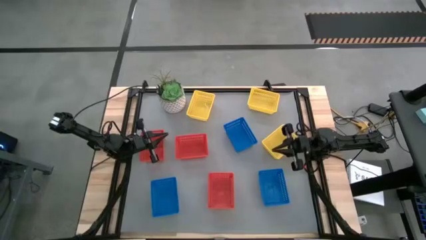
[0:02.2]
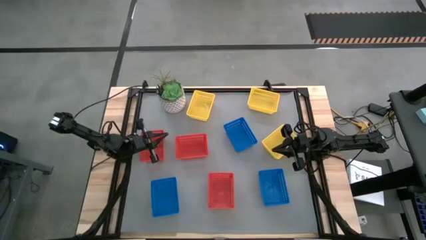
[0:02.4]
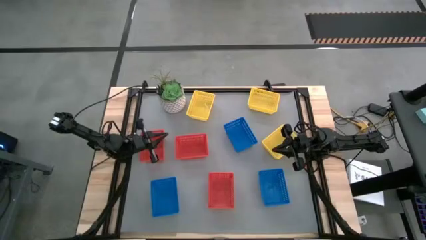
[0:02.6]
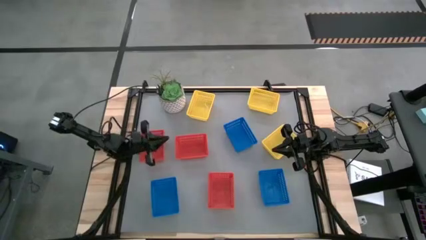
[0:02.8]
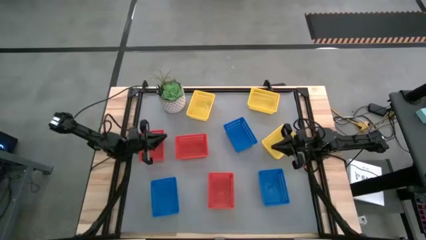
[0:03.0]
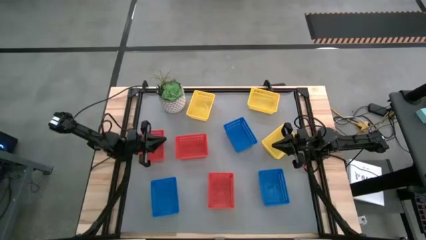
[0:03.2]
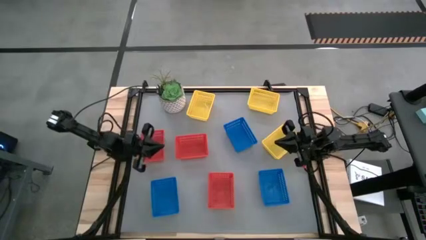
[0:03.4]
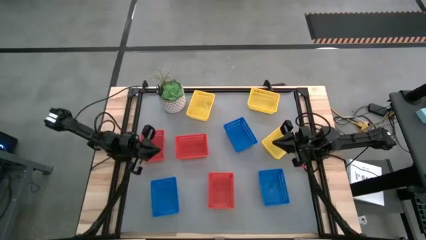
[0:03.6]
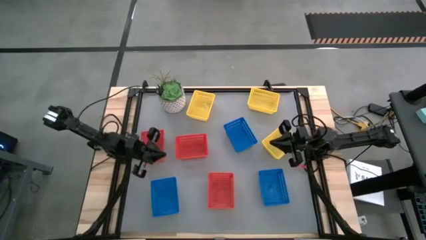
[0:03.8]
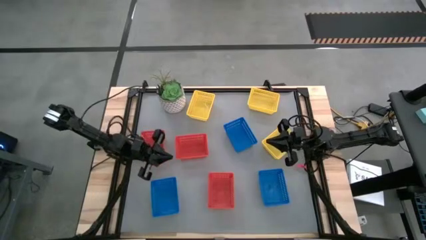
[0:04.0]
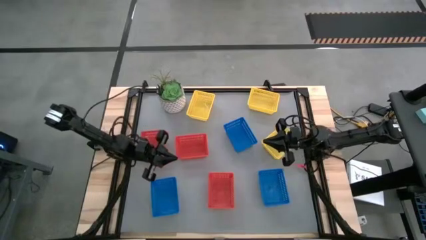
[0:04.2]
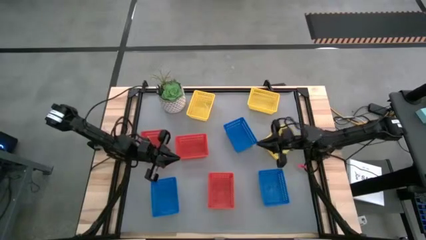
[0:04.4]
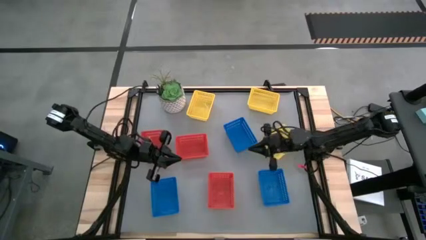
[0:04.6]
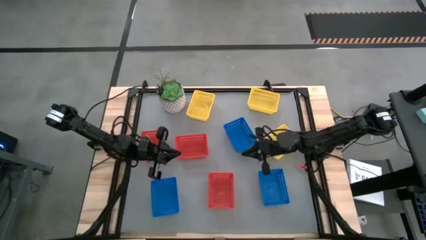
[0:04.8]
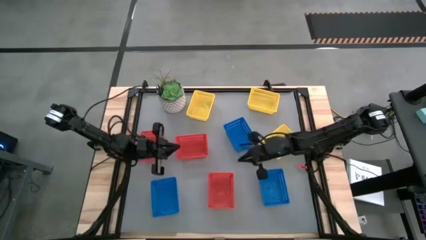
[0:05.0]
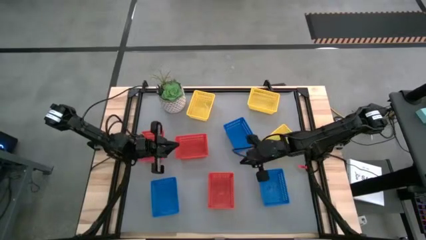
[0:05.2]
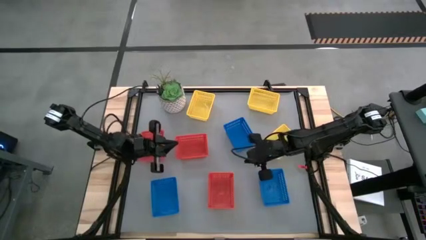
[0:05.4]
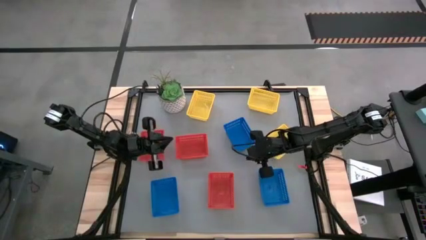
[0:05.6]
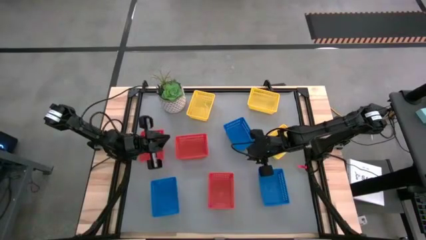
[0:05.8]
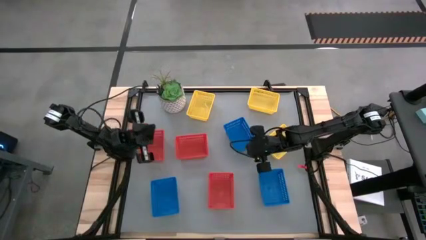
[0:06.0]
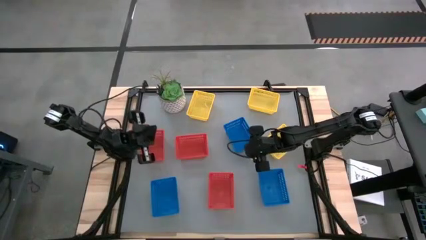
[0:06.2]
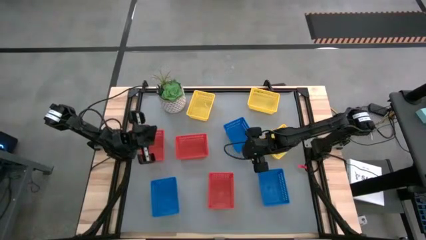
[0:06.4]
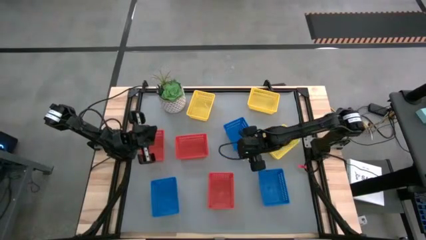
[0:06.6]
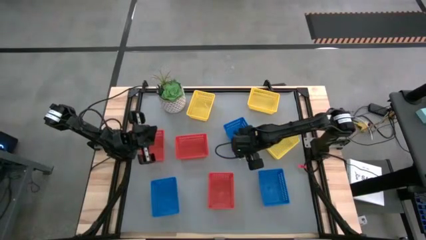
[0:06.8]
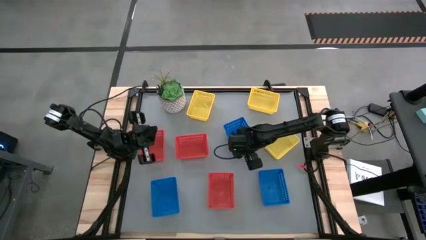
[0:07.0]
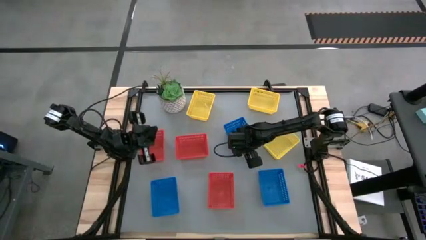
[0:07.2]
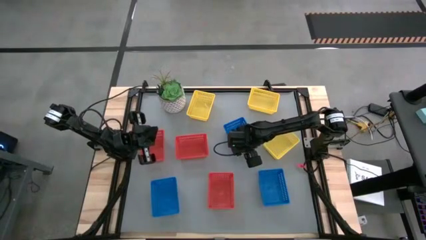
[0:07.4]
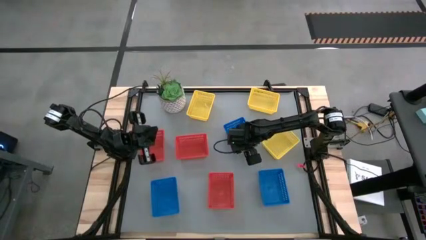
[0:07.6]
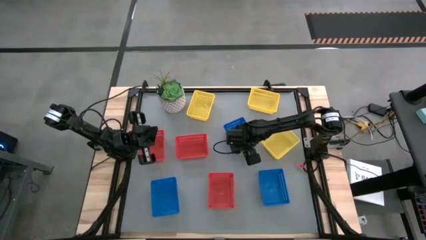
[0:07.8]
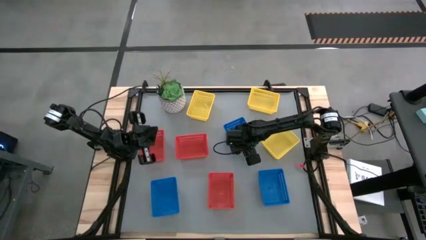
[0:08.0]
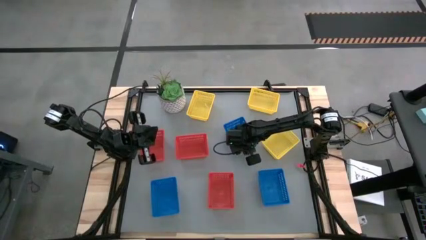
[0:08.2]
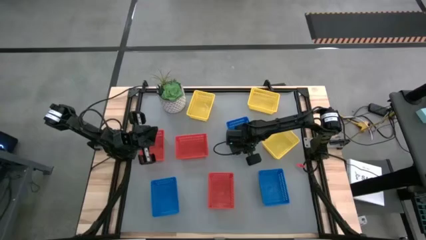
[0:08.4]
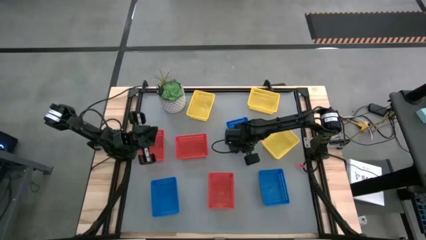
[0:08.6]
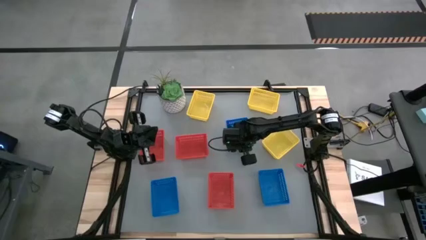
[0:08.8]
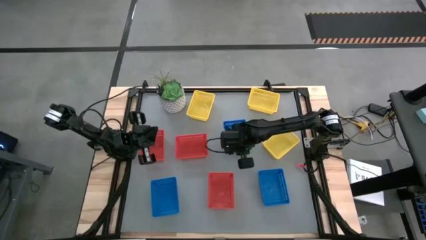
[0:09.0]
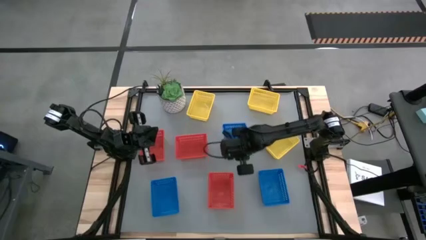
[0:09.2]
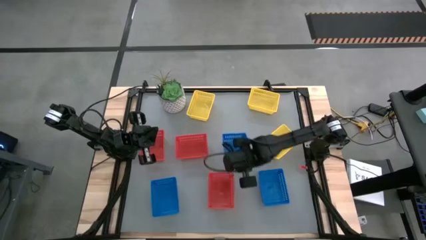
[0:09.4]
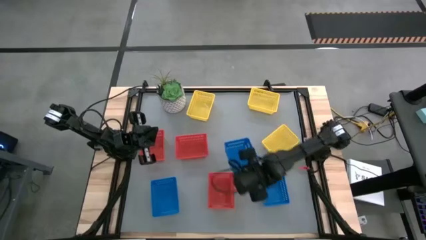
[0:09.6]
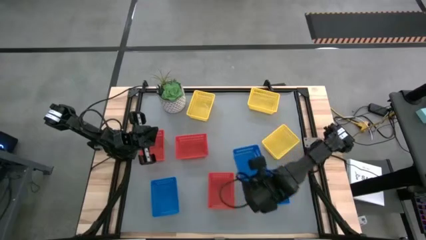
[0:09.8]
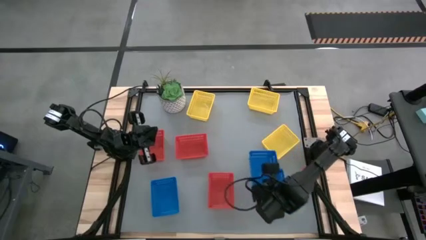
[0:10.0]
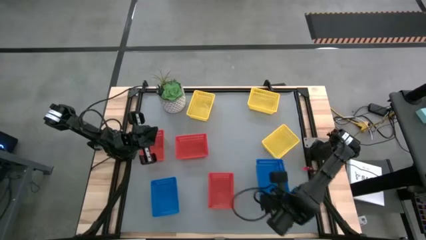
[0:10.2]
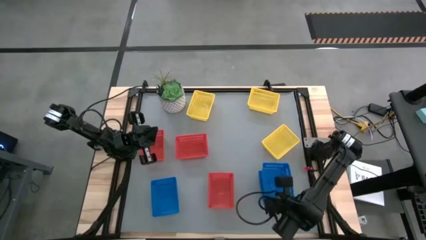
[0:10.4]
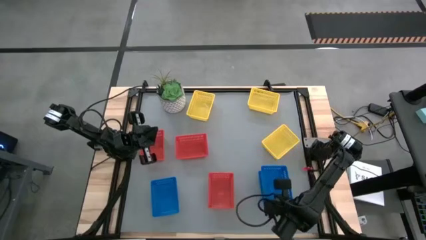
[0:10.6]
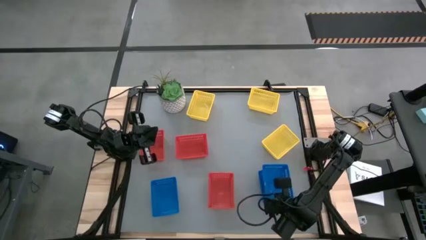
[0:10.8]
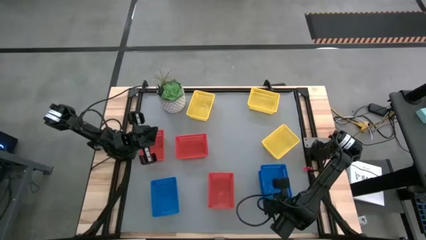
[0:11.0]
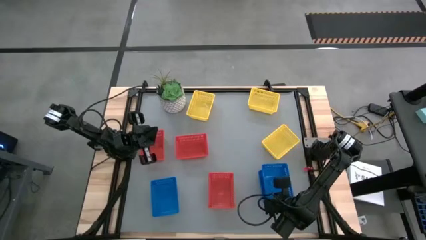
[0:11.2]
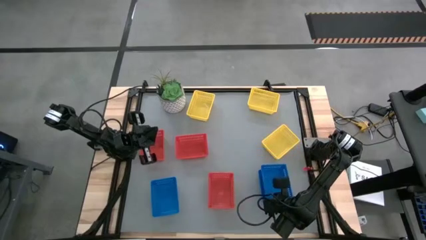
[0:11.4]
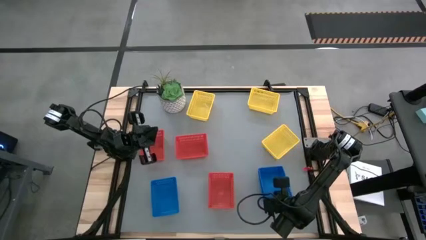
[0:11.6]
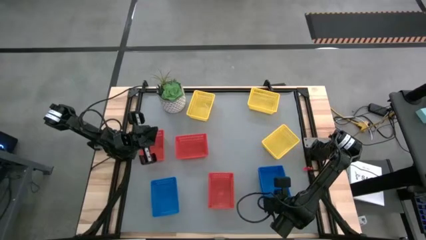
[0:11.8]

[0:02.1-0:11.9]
Stack the top blue bin on top of the bottom right blue bin
